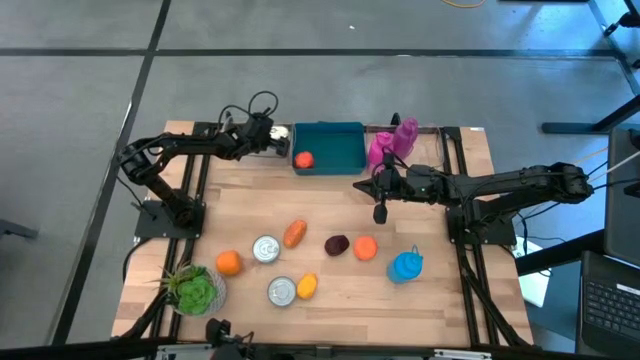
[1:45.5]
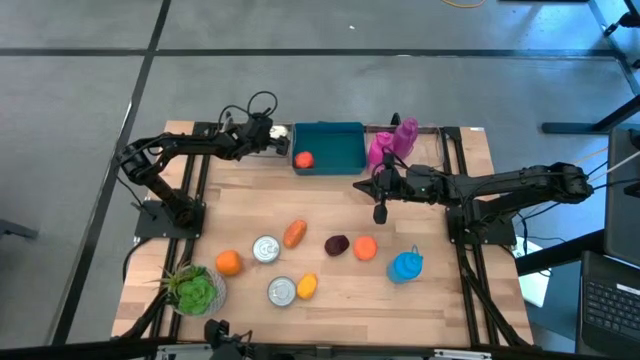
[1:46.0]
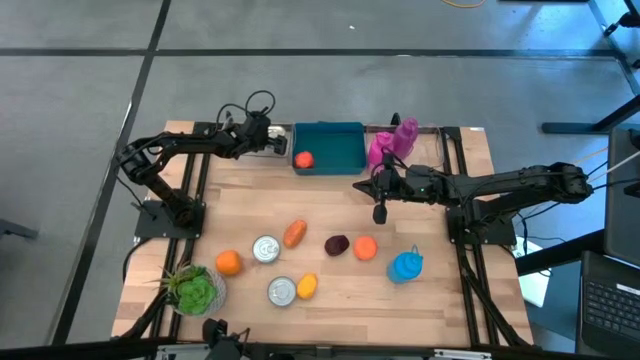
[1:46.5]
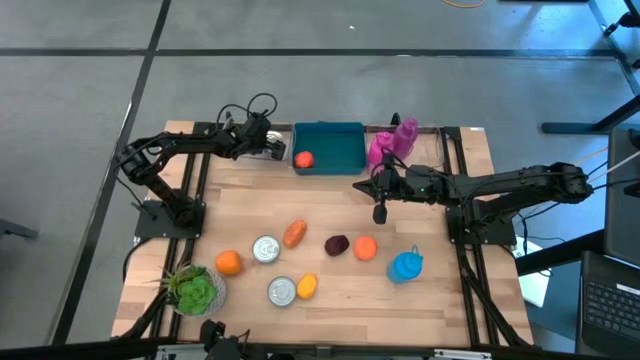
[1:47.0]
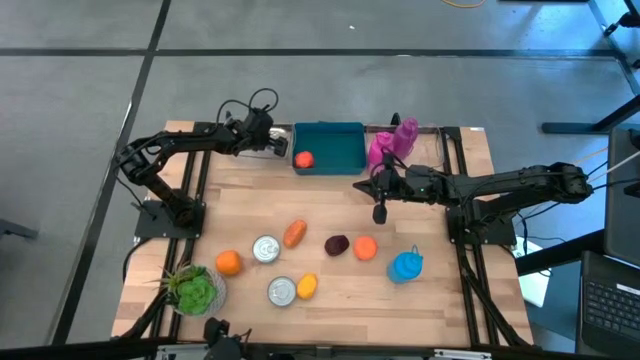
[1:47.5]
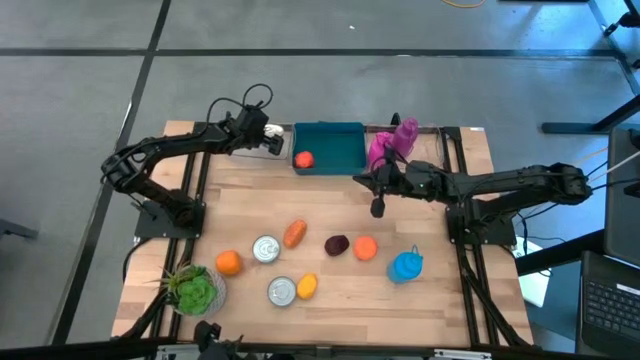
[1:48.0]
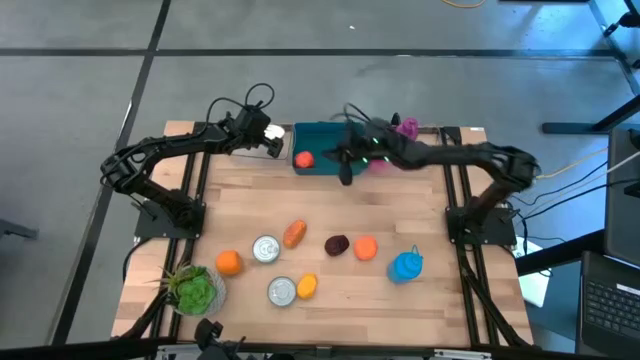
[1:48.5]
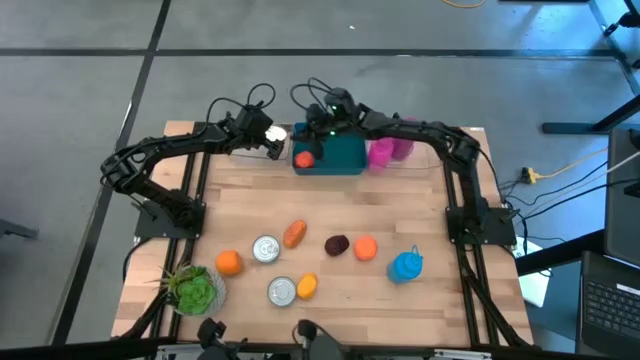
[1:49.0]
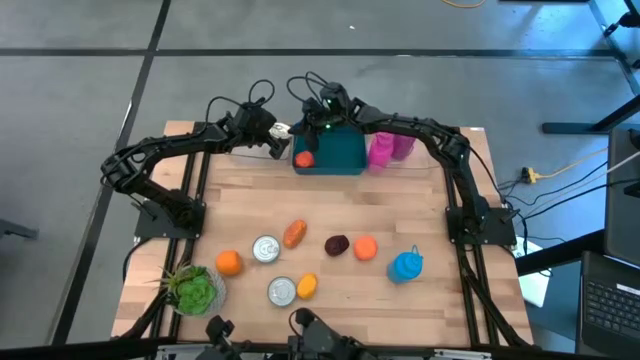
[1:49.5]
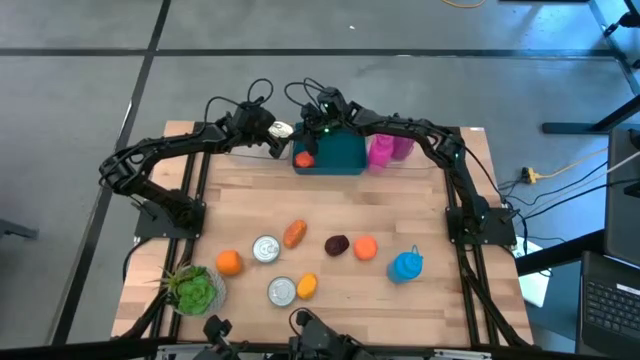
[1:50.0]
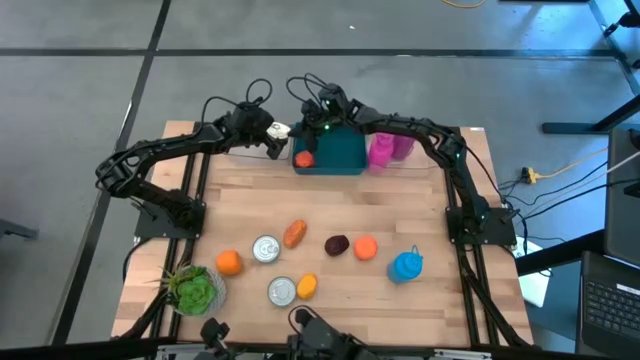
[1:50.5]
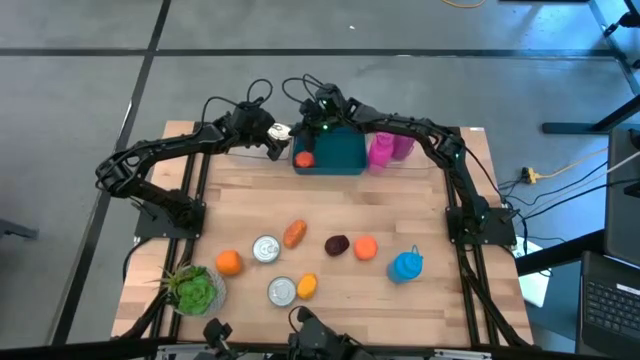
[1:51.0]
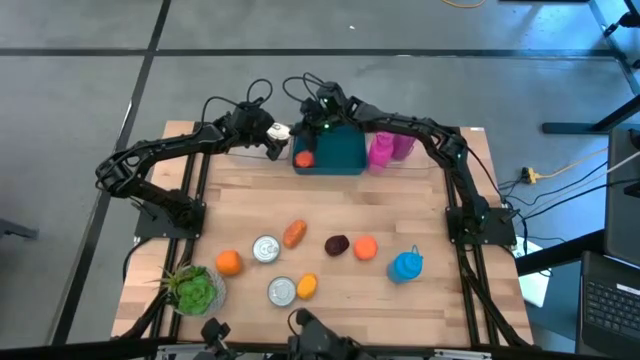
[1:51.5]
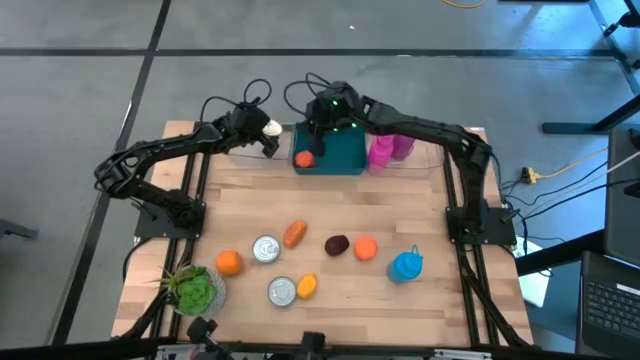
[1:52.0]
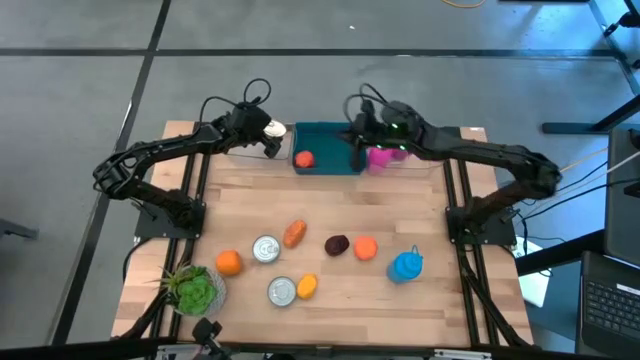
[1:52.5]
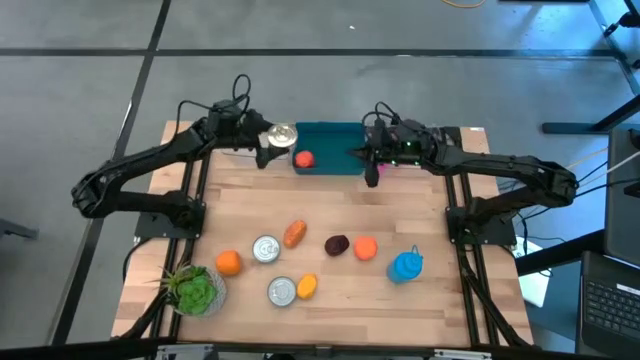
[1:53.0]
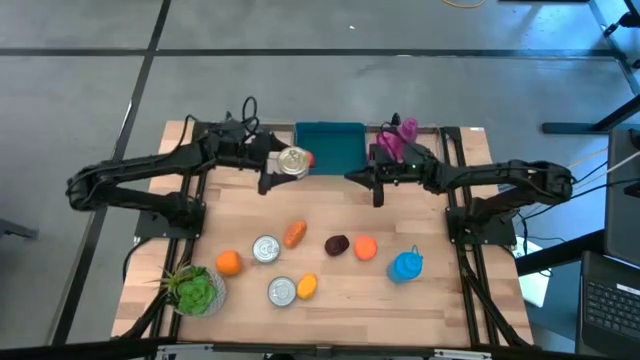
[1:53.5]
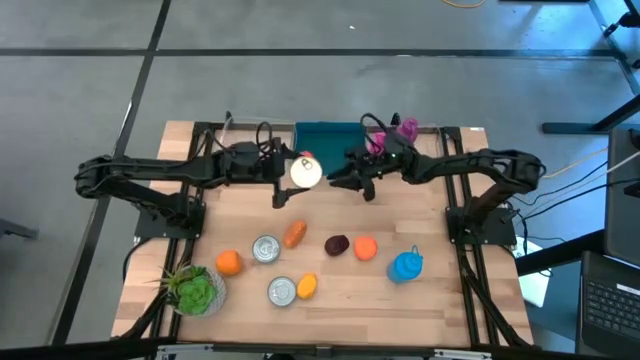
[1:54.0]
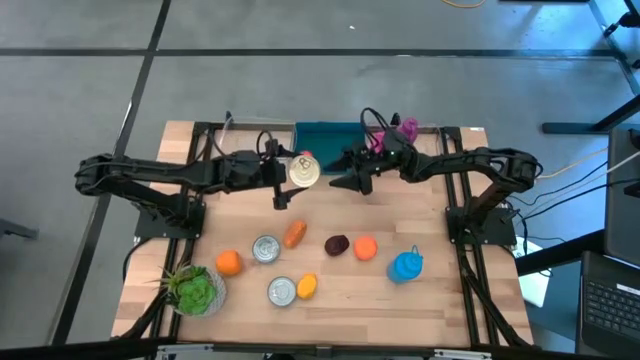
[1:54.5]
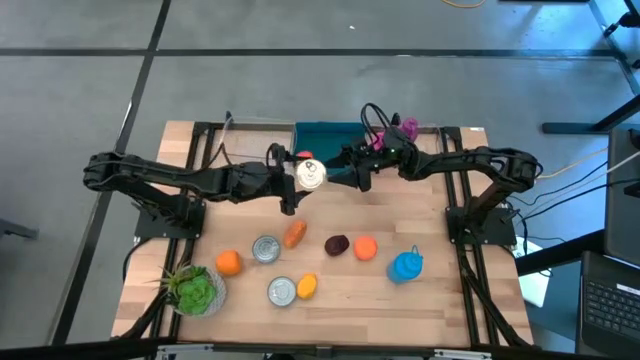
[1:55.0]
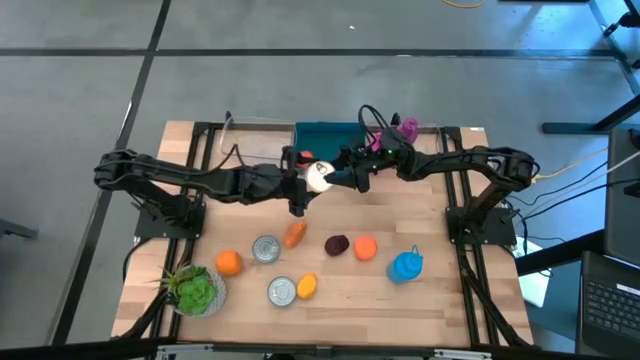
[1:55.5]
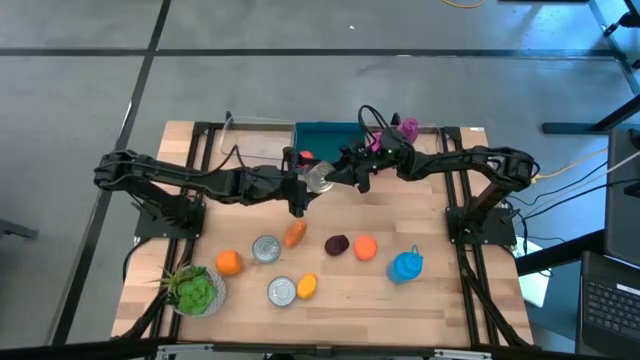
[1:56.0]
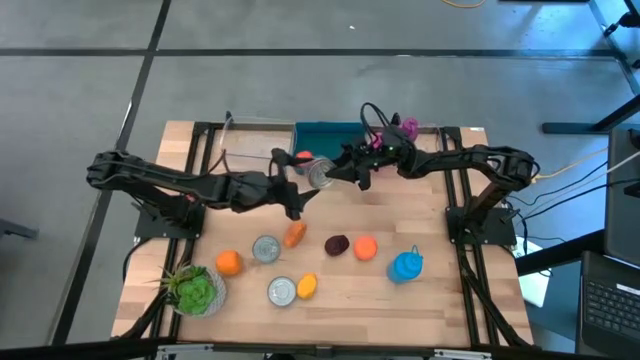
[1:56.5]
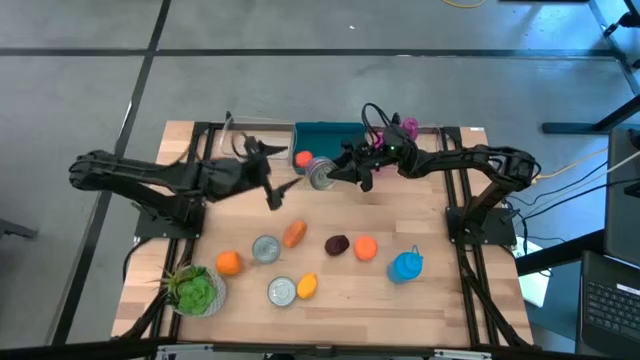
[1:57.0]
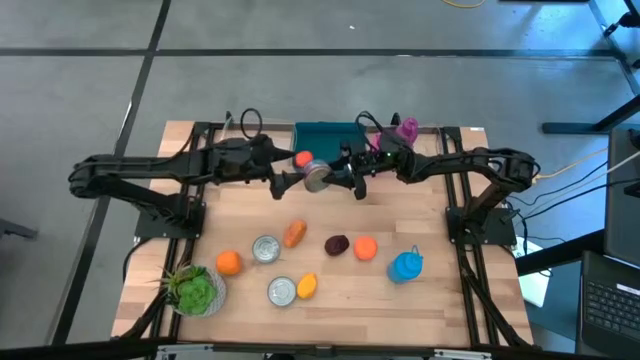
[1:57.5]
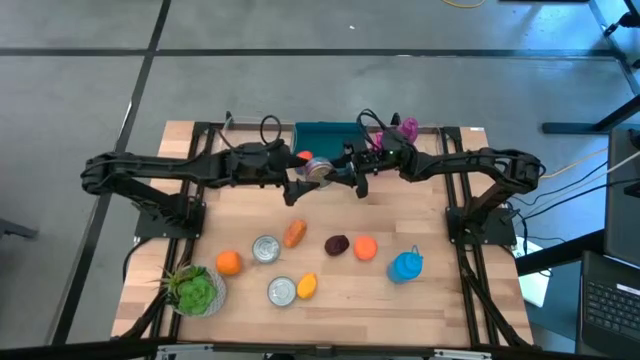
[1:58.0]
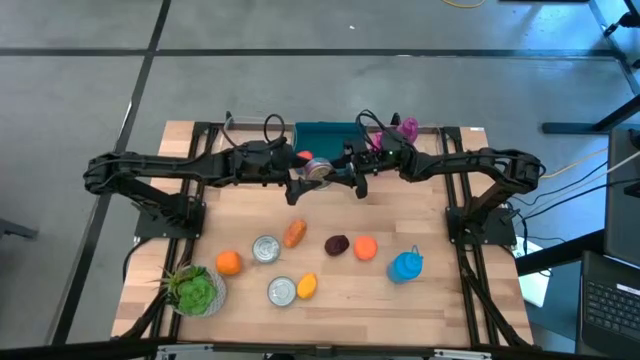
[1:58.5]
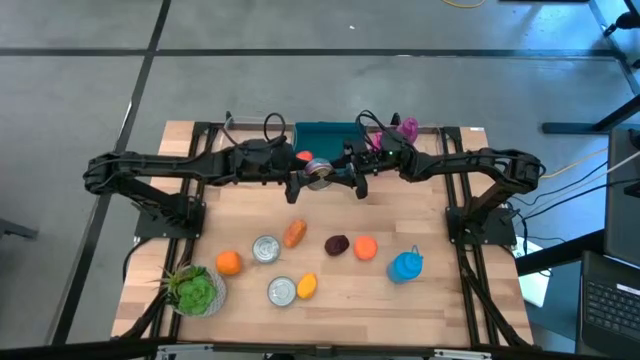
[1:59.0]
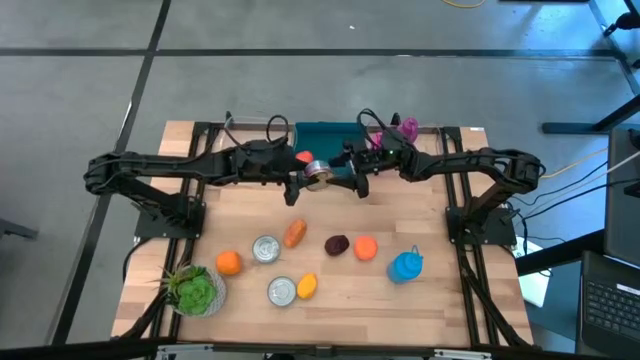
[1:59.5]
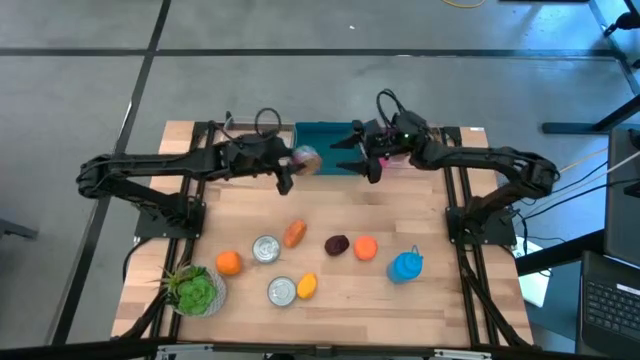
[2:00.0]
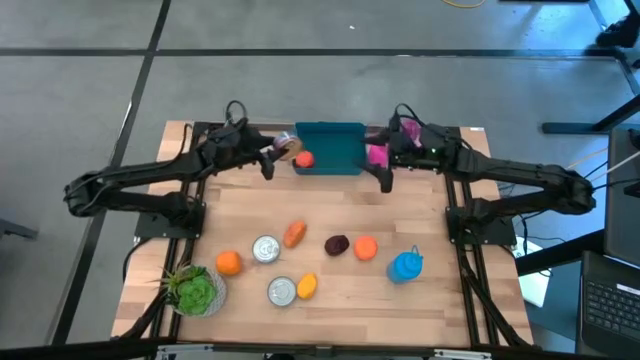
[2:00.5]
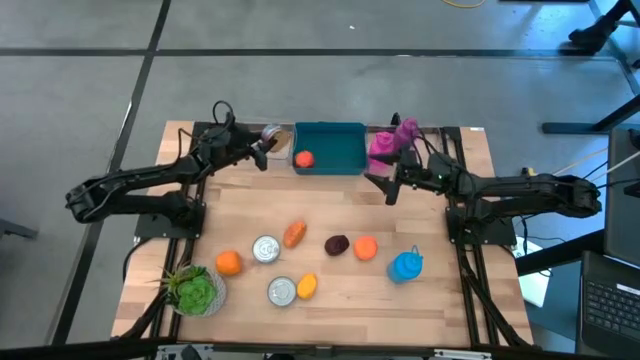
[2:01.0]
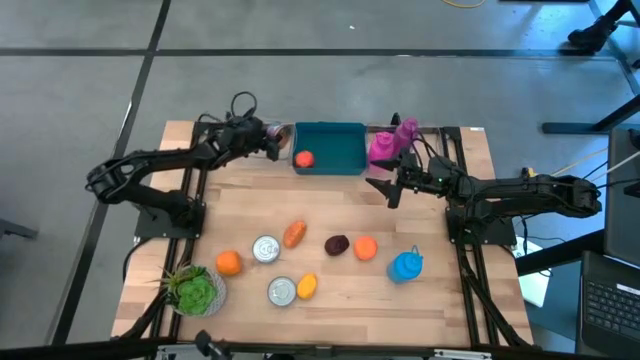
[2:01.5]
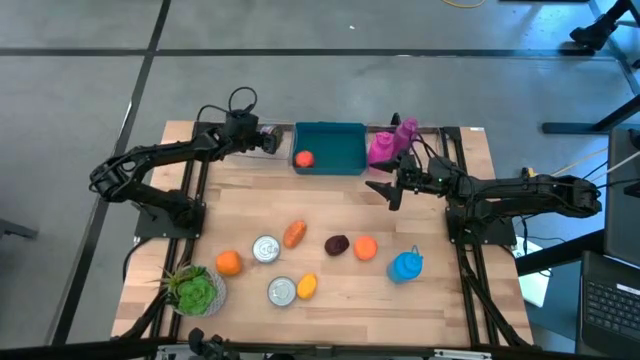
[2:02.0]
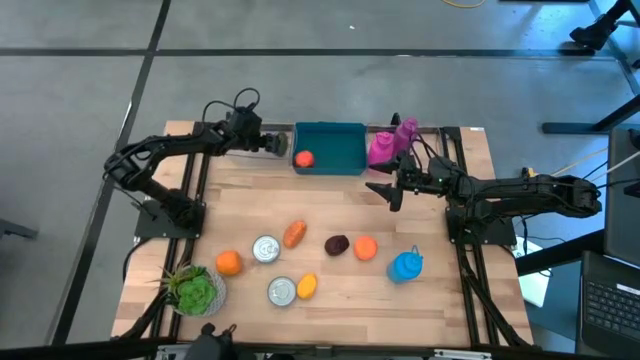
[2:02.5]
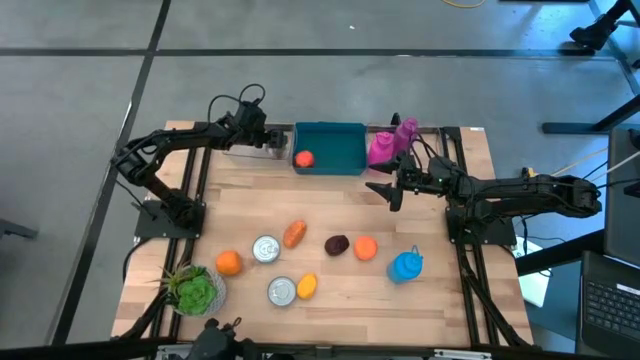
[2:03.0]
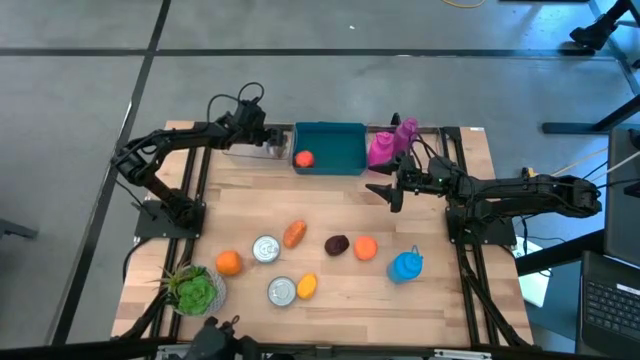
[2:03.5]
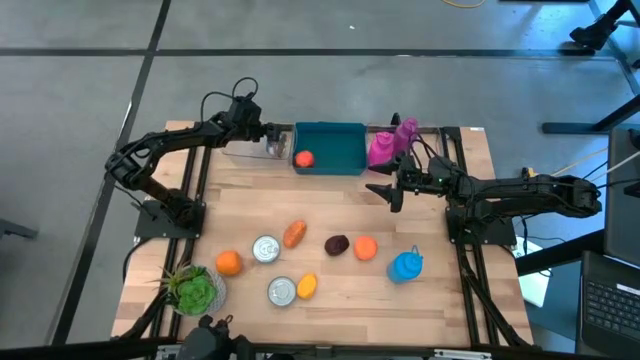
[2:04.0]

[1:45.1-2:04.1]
Task: Pick & Place Food Item
Put the top blue pink tuna can into the left transparent bin

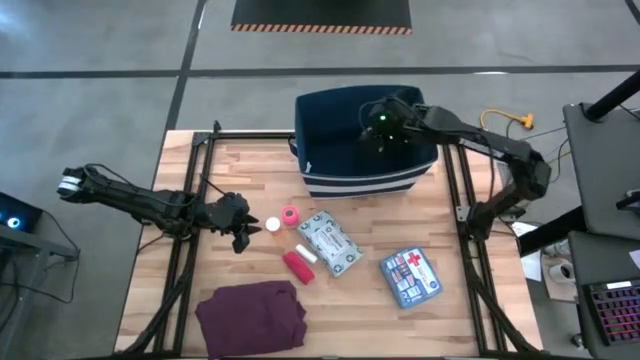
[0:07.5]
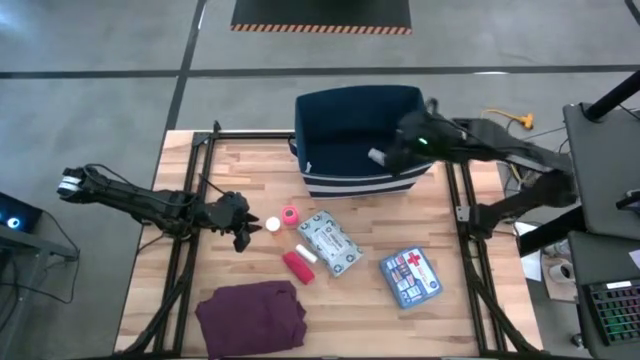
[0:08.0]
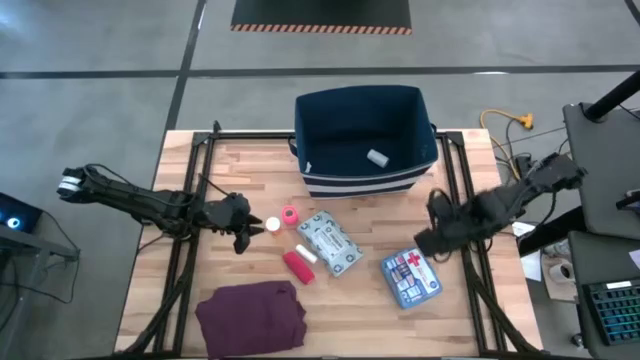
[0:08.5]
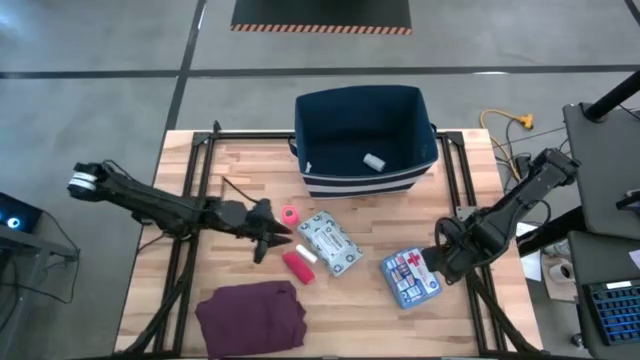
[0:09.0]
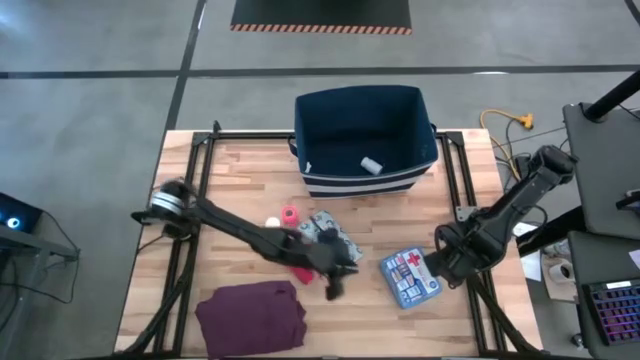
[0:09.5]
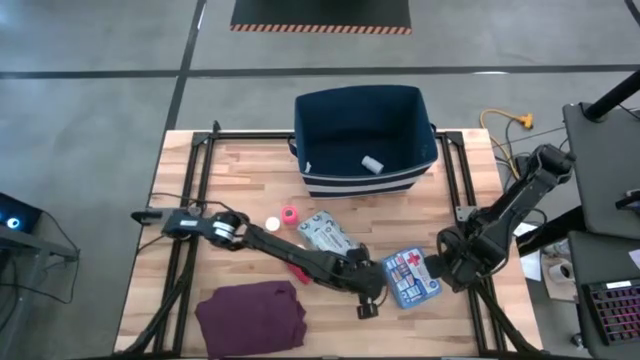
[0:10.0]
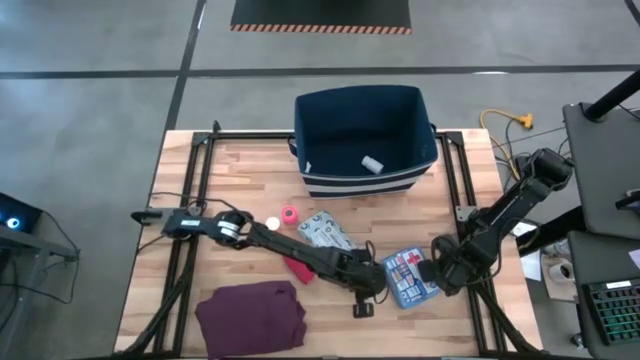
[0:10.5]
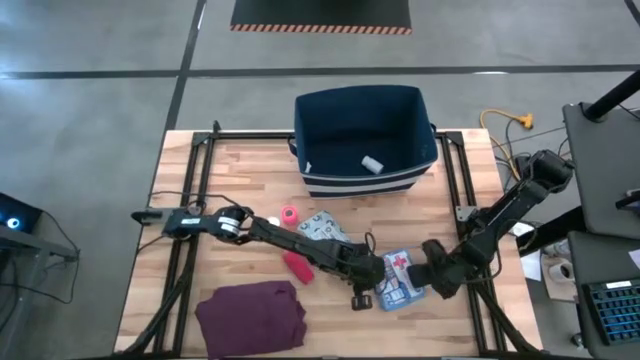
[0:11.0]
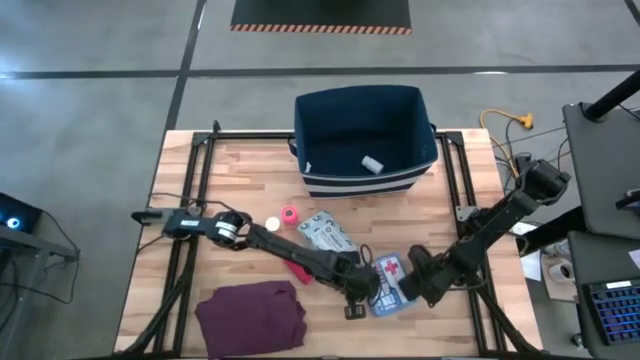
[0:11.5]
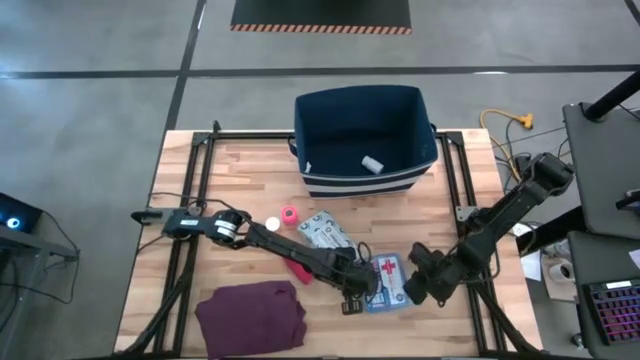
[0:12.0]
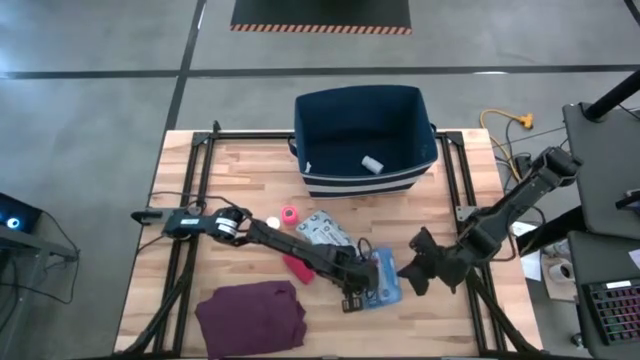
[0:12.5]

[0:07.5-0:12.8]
Task: Pick & place medical supplies in basket/bin
Put the blue first aid kit into the blue bin
